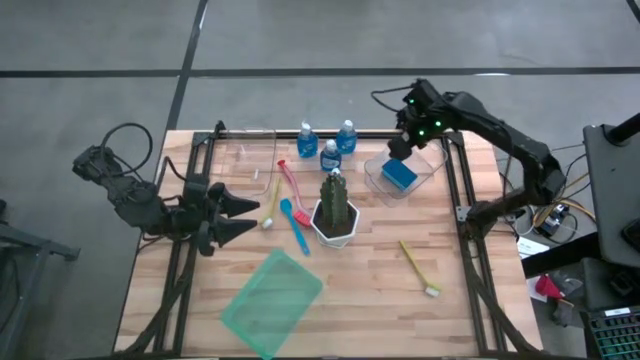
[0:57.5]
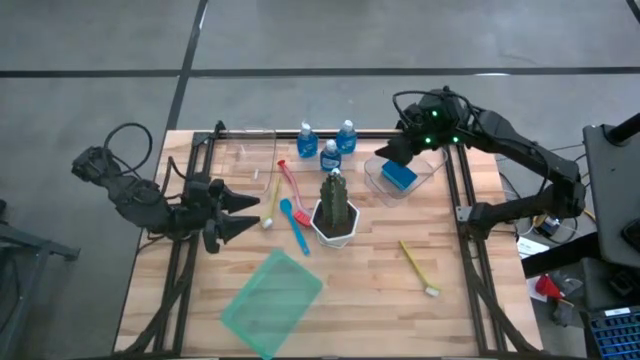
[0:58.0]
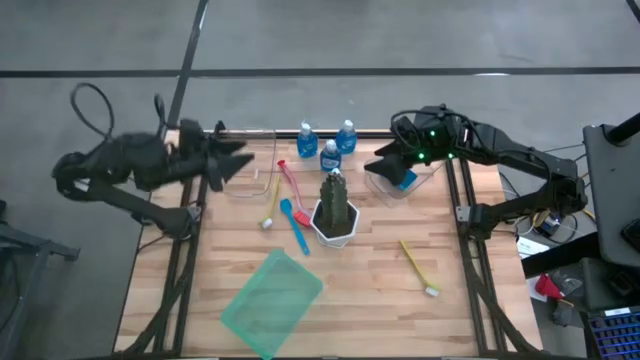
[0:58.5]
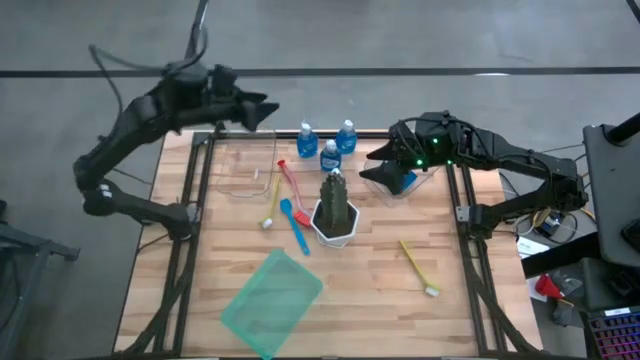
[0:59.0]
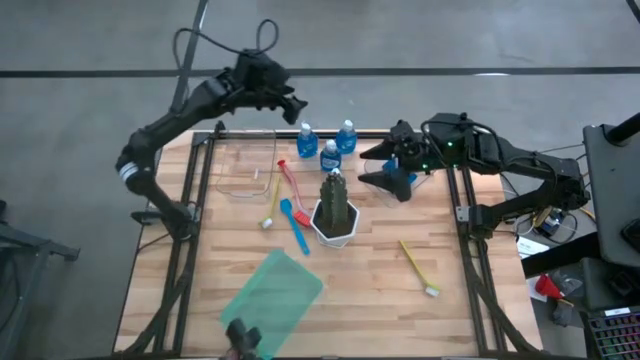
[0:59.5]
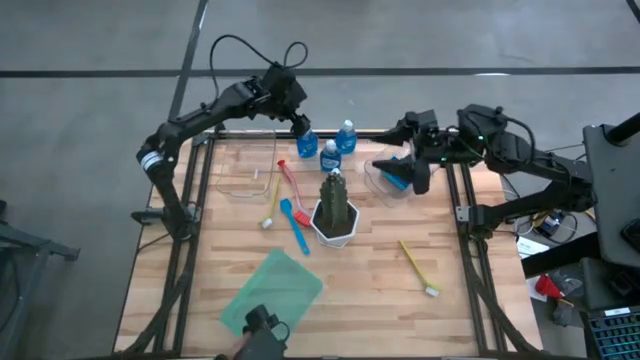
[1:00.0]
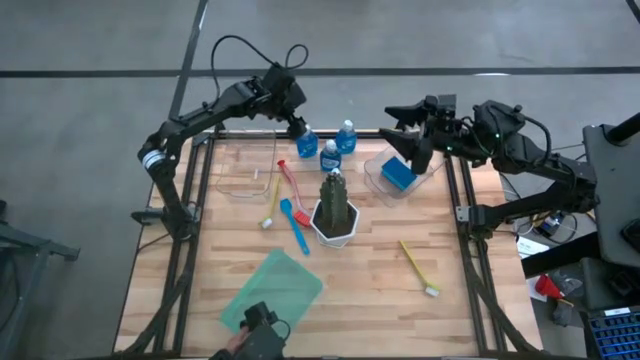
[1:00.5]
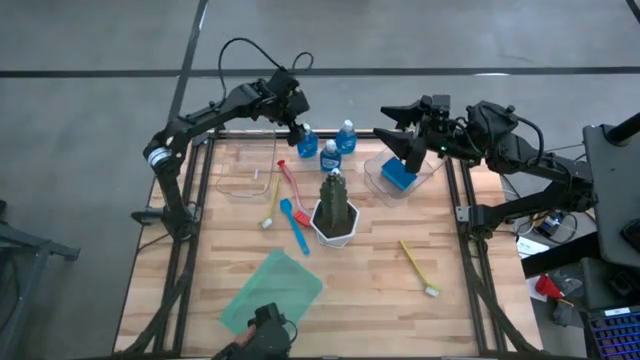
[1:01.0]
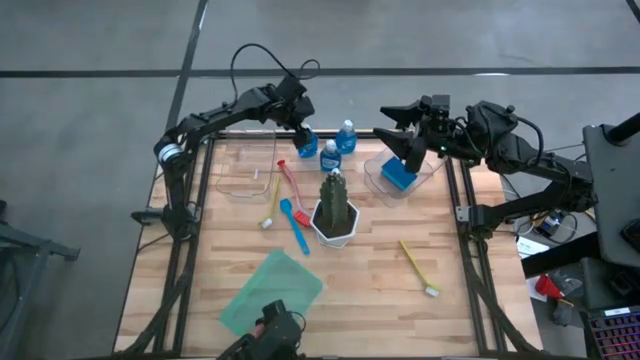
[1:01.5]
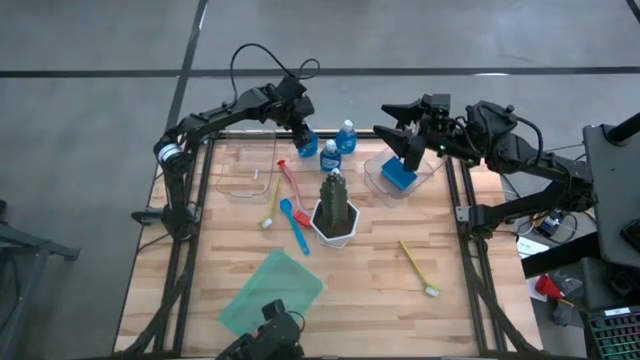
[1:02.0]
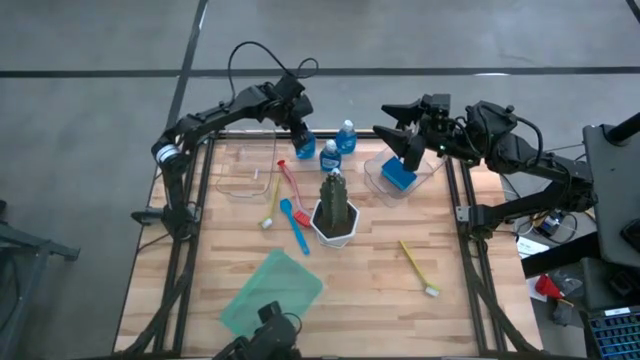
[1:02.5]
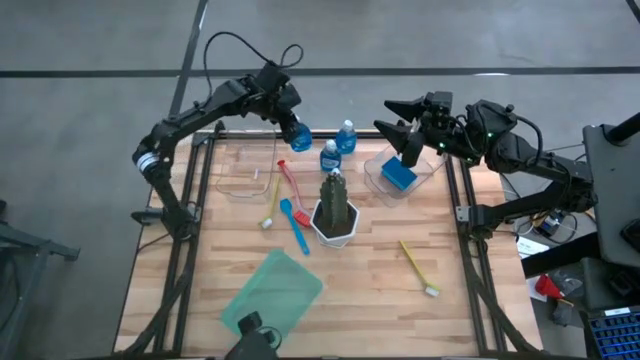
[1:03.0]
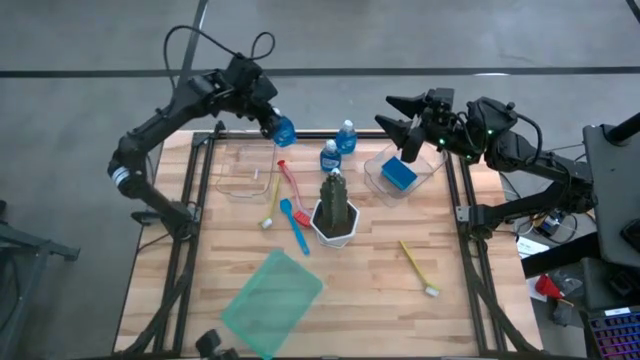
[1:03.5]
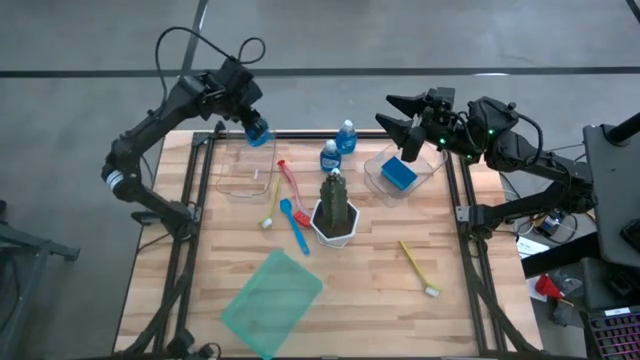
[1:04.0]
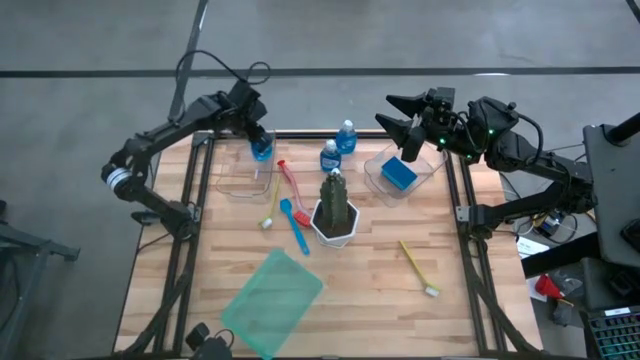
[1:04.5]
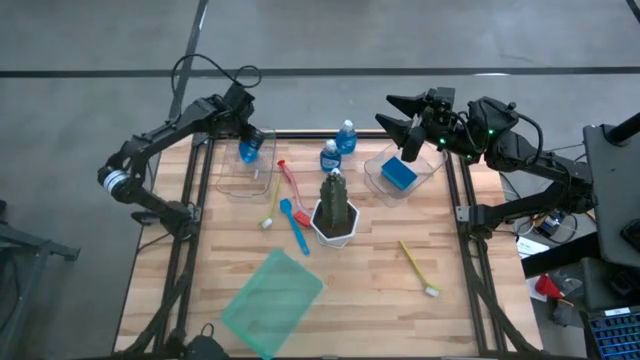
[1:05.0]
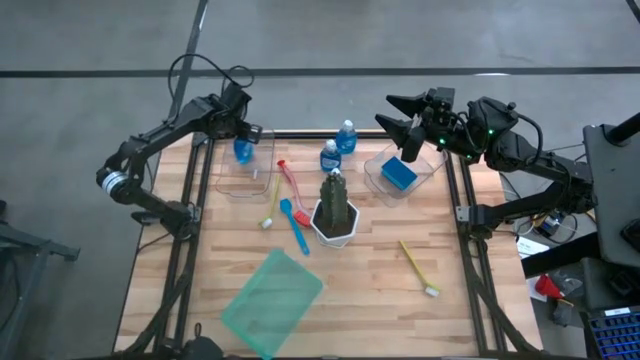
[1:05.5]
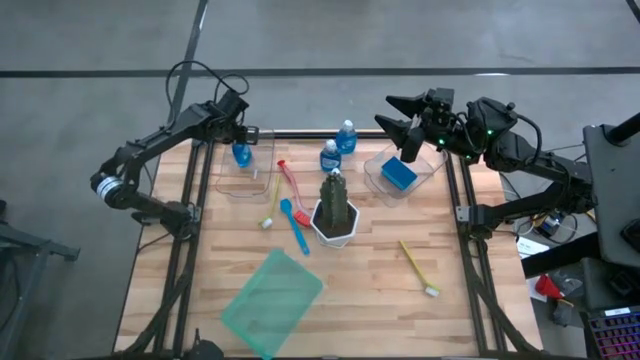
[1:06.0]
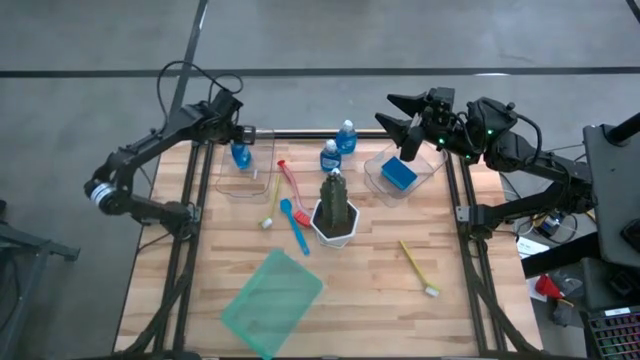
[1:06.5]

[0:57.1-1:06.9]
Task: Pick & Place Kitchen Sink Supplies
Put the blue liquid detergent into the left transparent bin

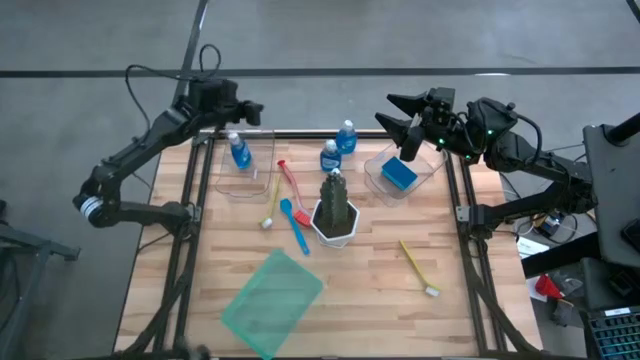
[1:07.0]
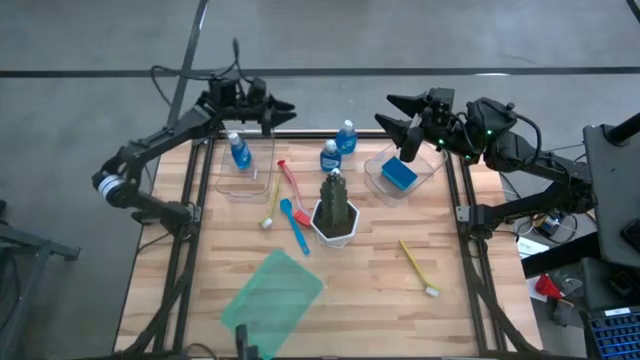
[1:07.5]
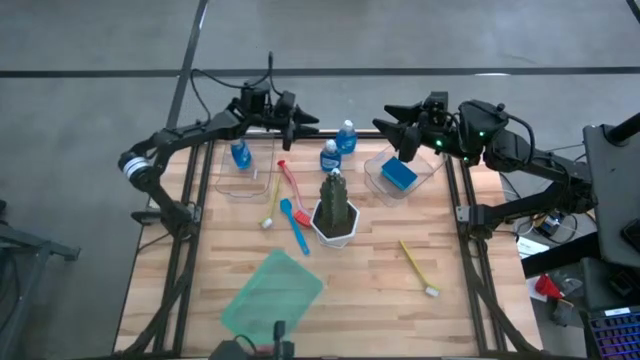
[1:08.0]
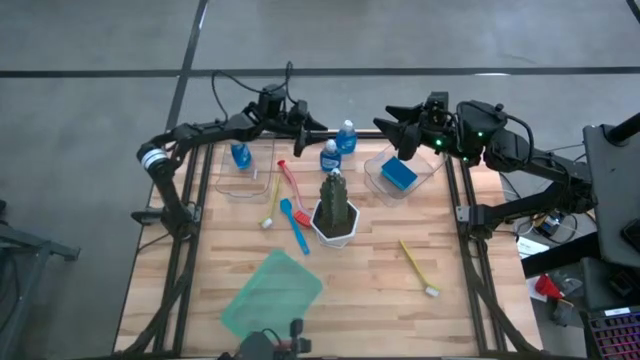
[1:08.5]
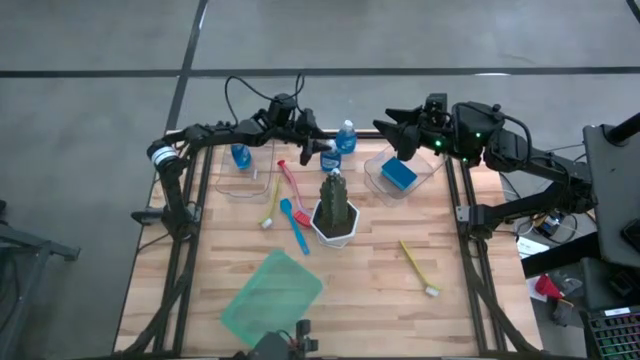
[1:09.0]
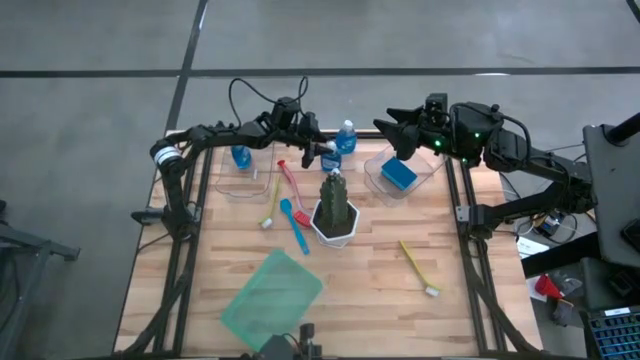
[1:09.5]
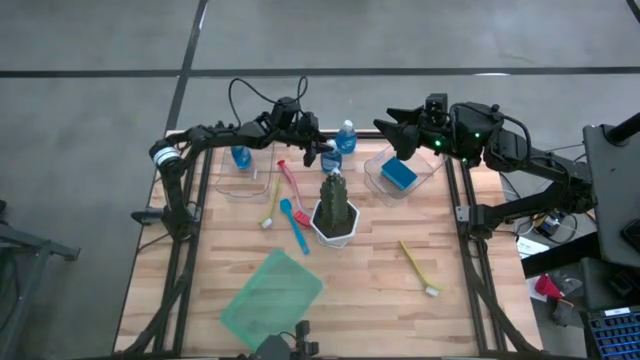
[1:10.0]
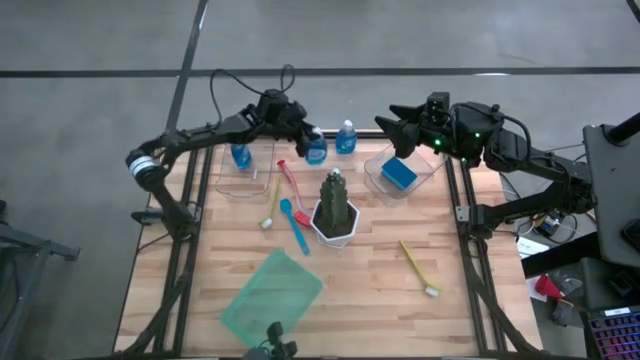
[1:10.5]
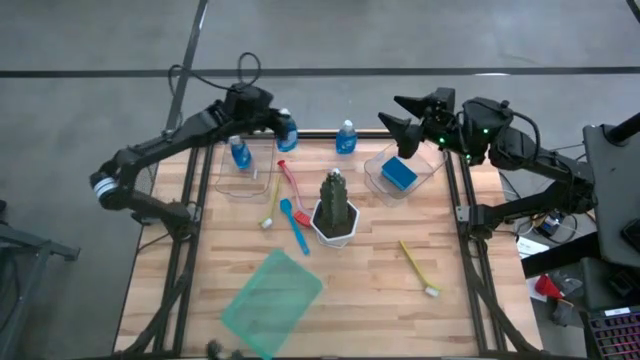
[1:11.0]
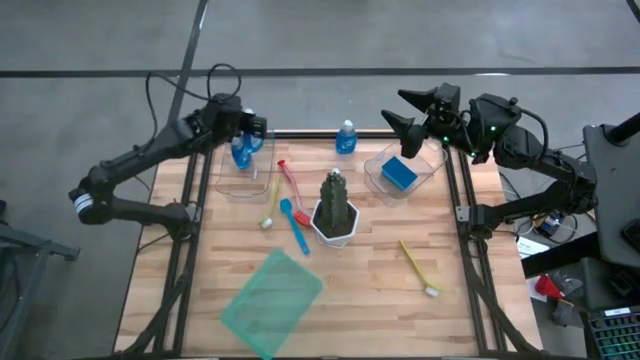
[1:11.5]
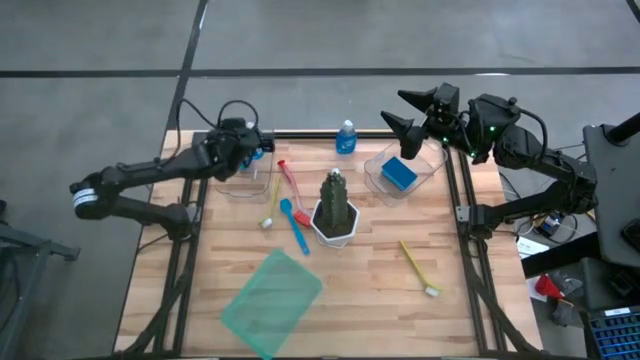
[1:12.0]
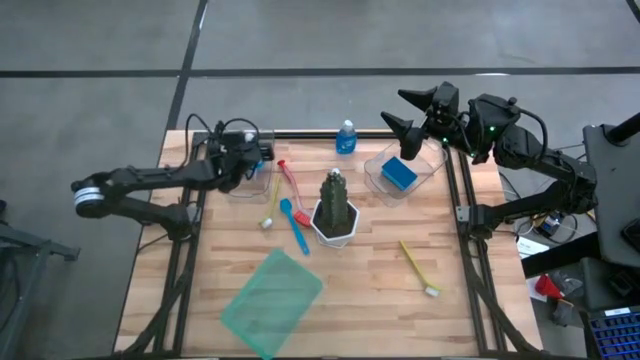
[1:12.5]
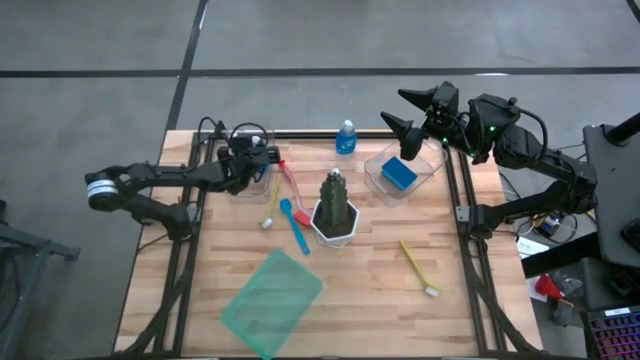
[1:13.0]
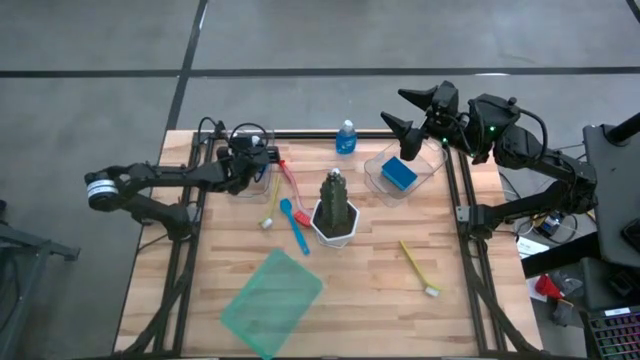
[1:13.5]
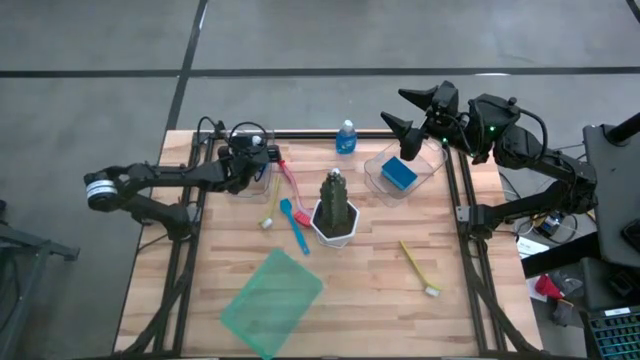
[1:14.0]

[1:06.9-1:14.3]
Put the blue liquid detergent into the left transparent bin

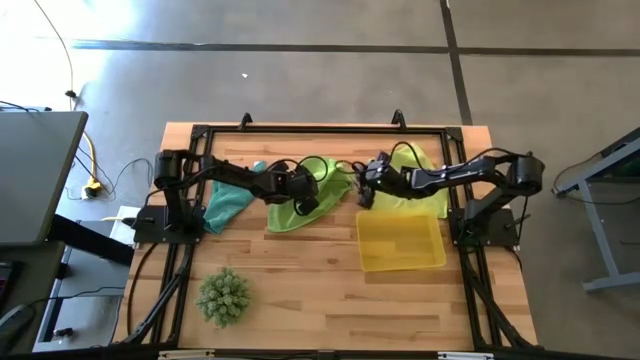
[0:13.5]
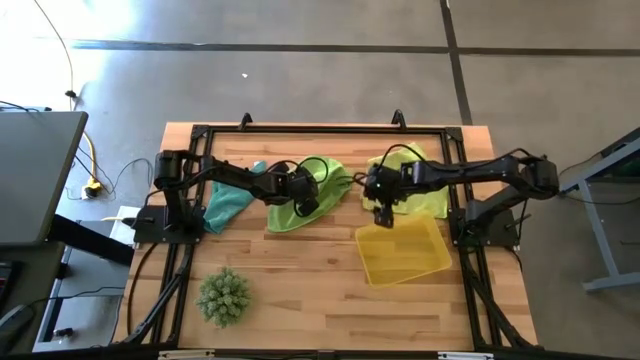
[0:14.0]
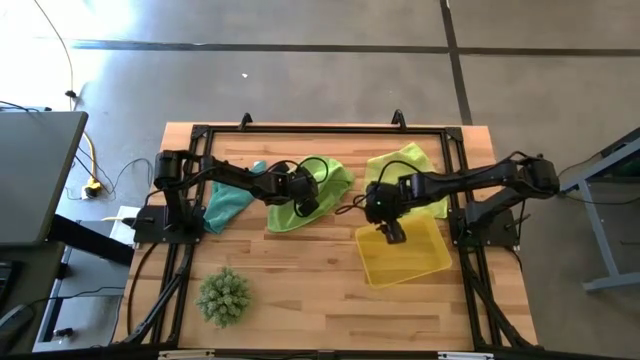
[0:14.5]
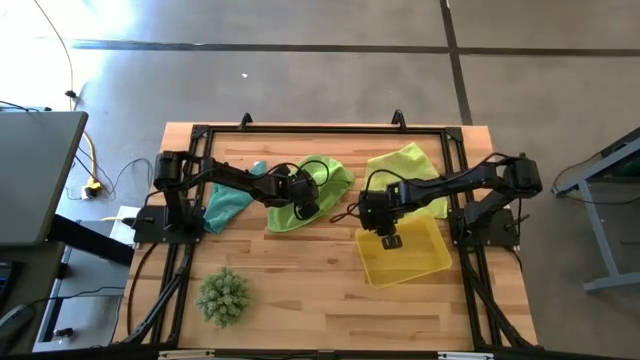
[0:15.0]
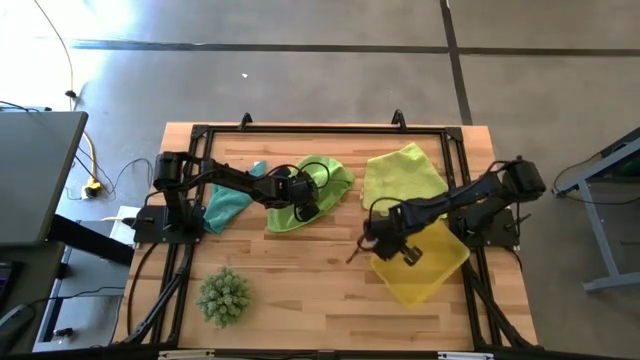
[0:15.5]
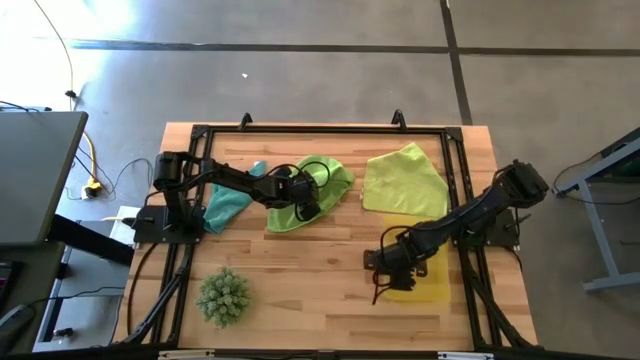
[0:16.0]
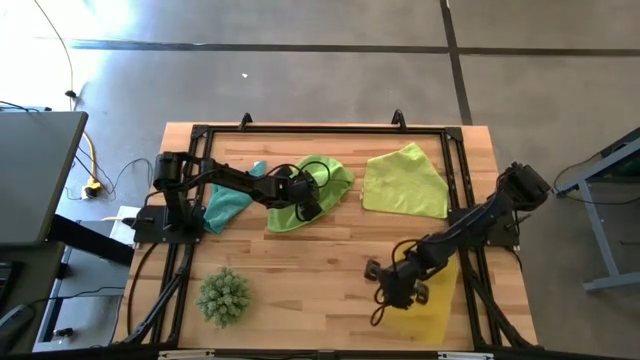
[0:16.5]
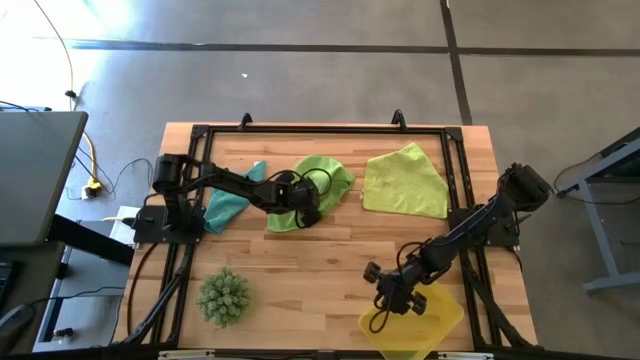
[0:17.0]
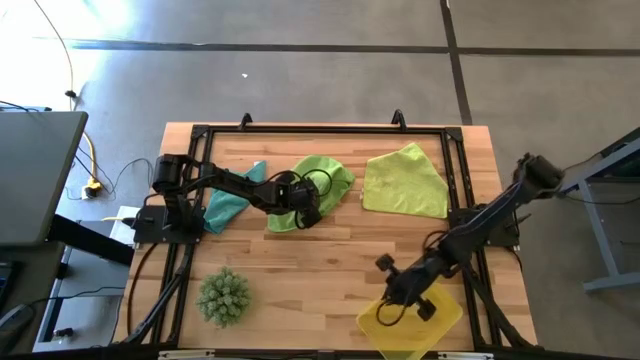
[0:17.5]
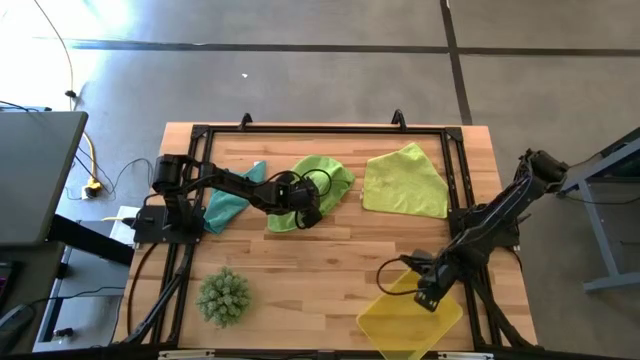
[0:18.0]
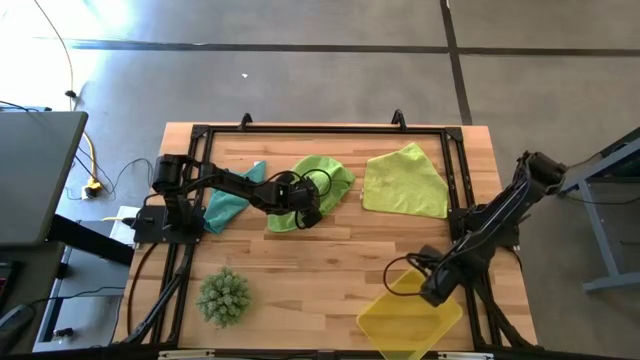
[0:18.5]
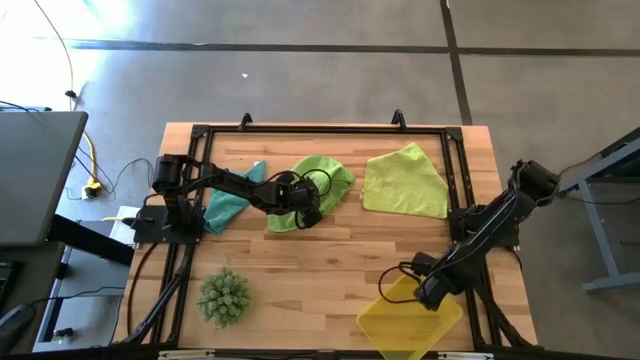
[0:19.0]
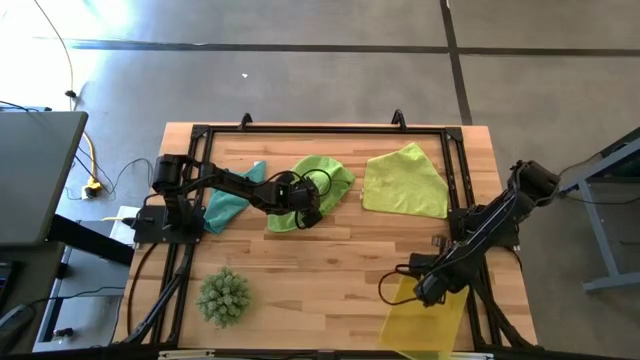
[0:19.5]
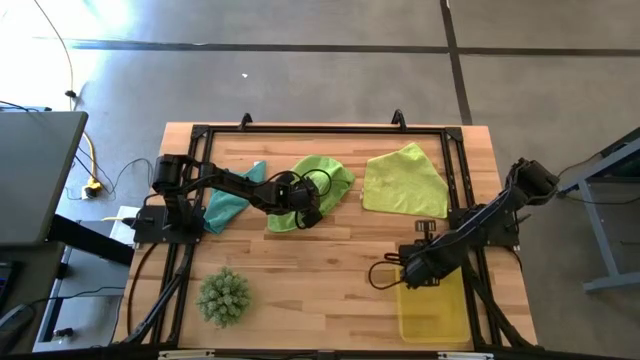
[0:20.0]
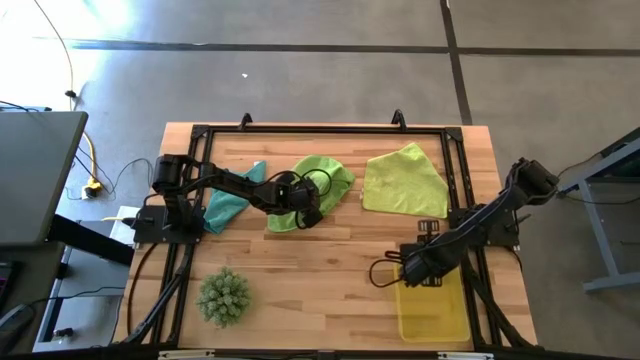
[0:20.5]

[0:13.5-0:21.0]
Task: Roll microfiber towels into tight, uniform cylinder then place into a basket
Move the yellow bin to the bottom right of the table
